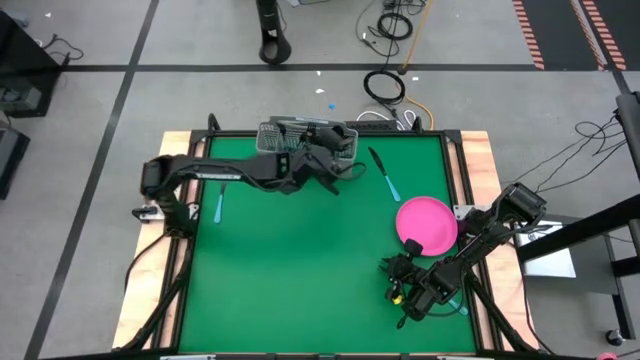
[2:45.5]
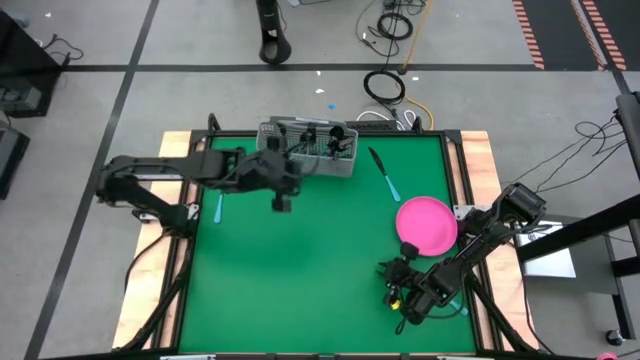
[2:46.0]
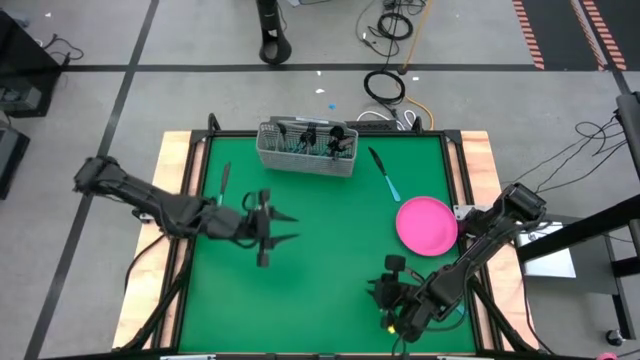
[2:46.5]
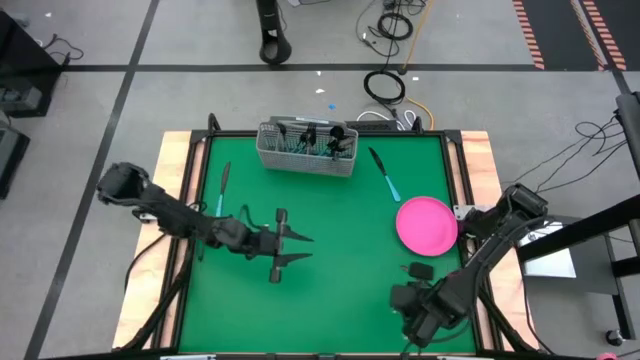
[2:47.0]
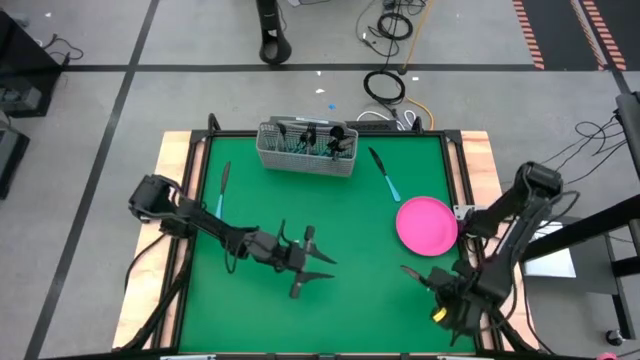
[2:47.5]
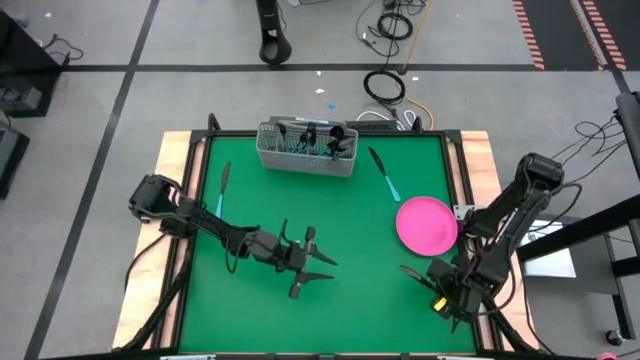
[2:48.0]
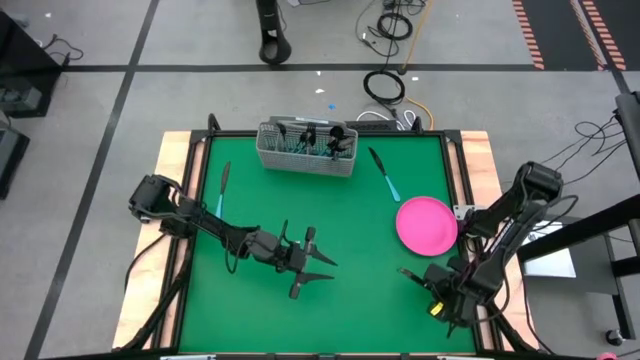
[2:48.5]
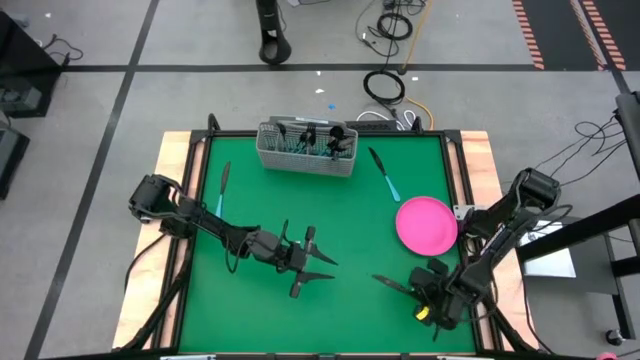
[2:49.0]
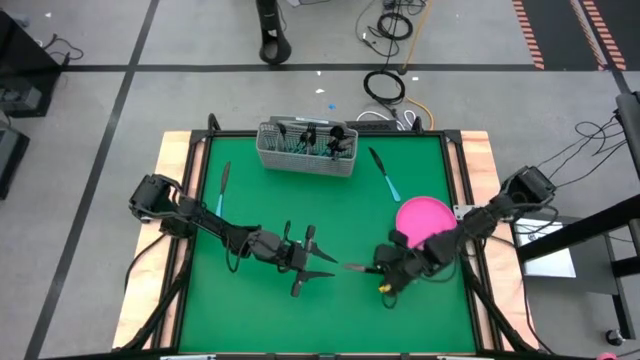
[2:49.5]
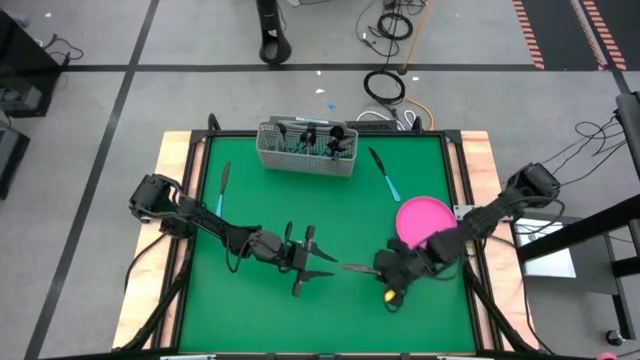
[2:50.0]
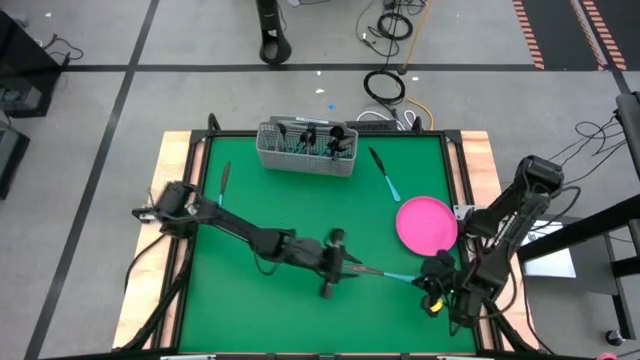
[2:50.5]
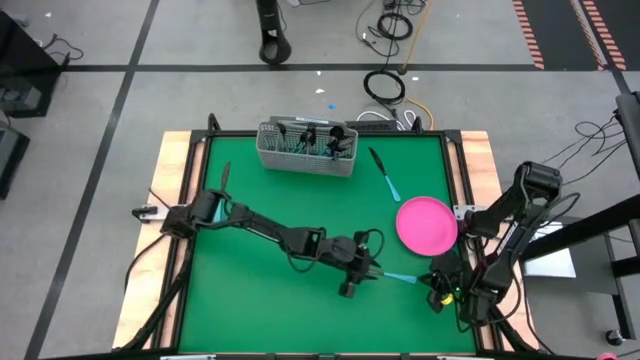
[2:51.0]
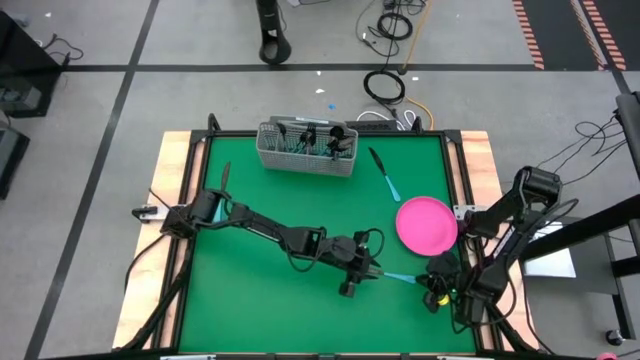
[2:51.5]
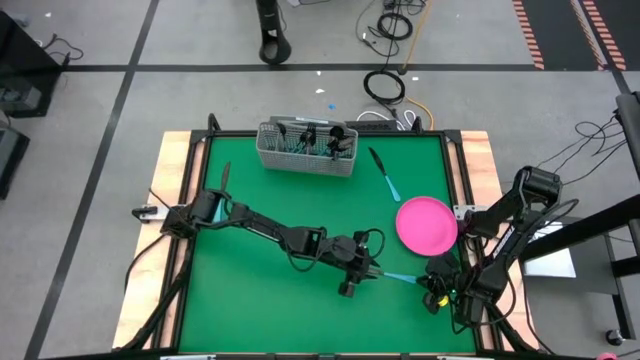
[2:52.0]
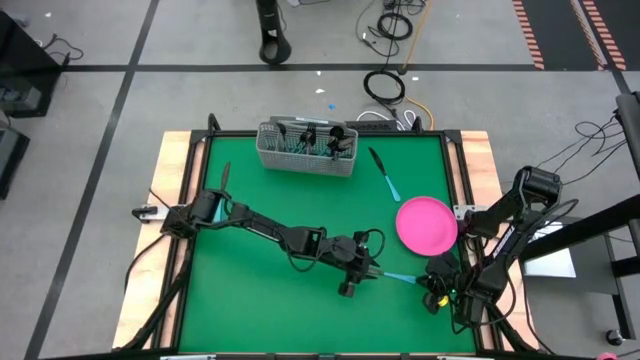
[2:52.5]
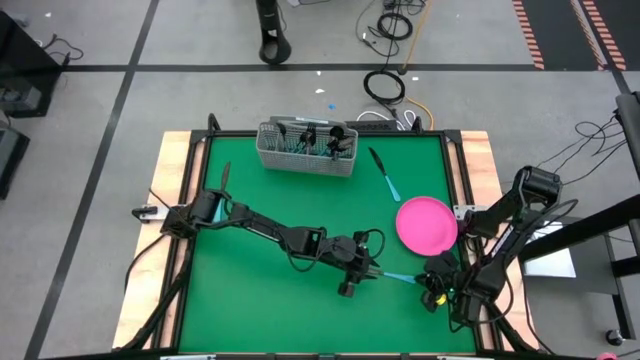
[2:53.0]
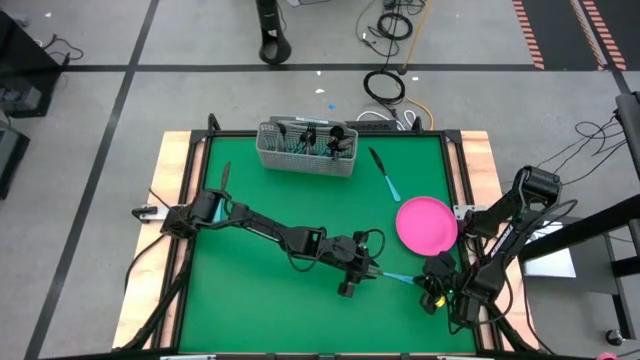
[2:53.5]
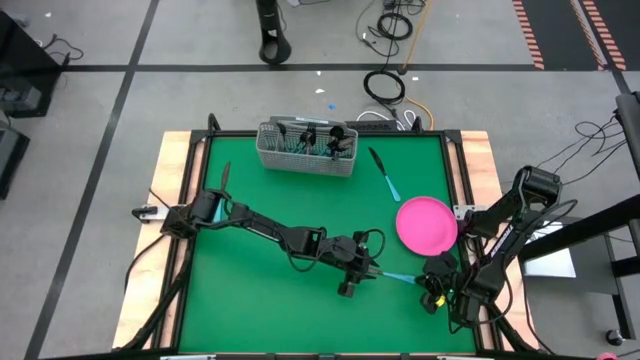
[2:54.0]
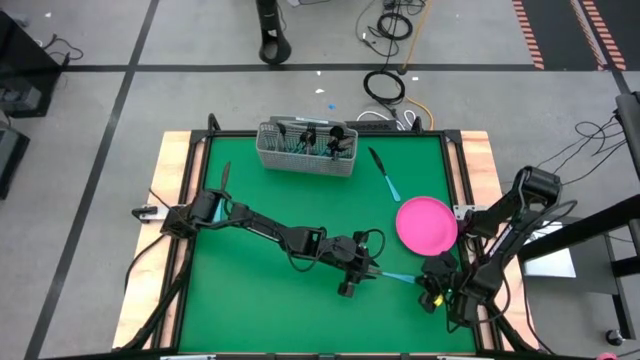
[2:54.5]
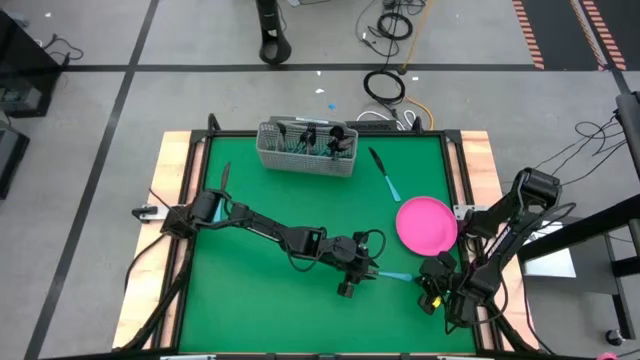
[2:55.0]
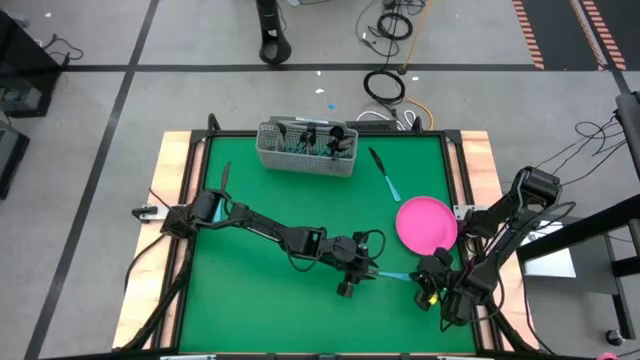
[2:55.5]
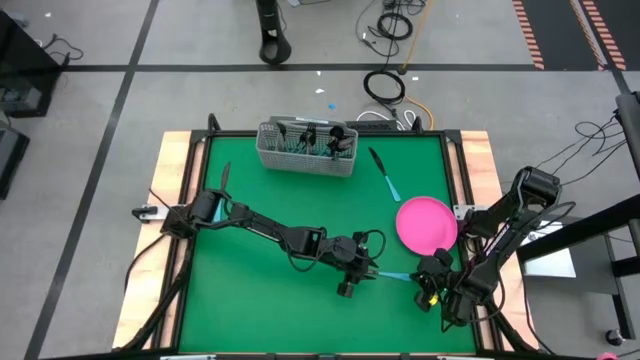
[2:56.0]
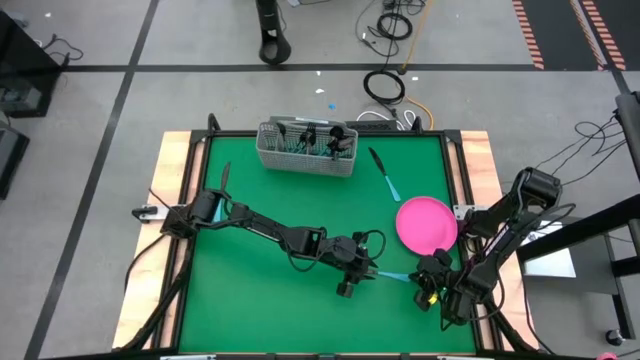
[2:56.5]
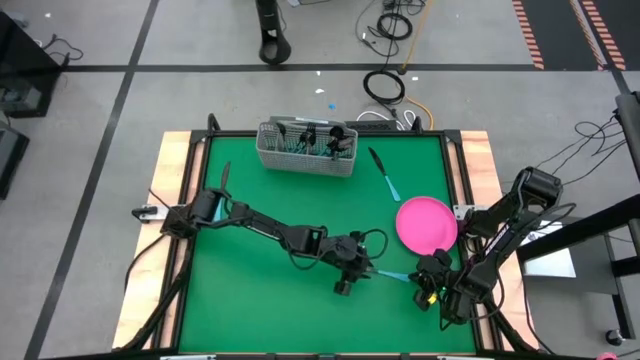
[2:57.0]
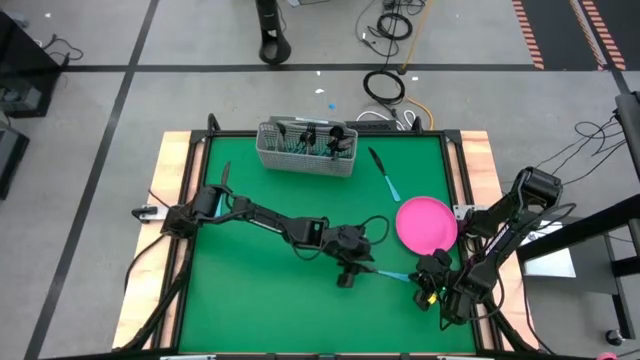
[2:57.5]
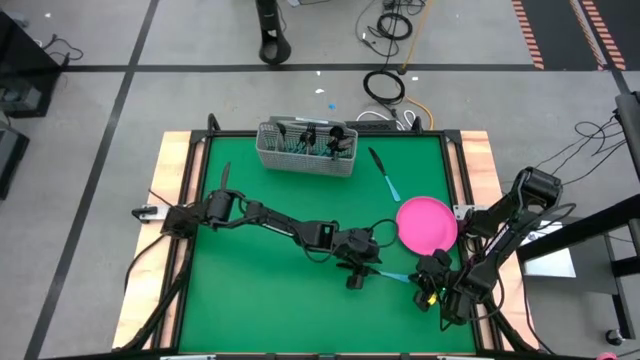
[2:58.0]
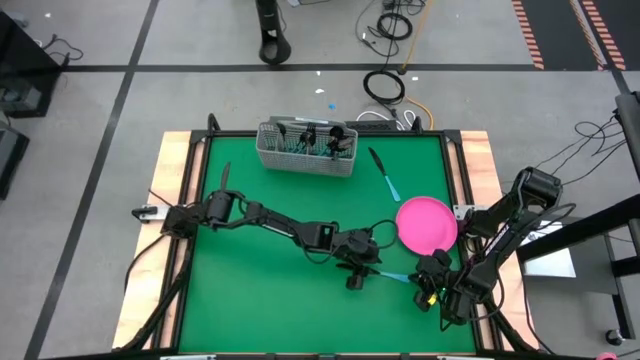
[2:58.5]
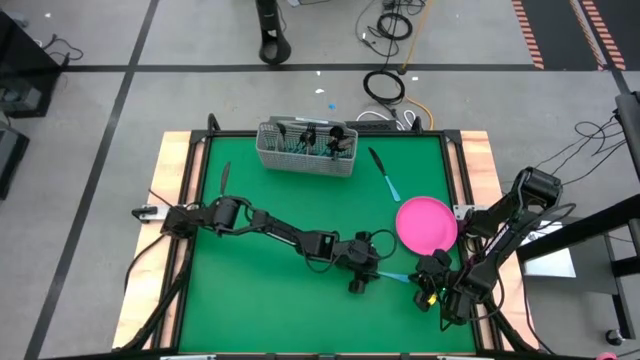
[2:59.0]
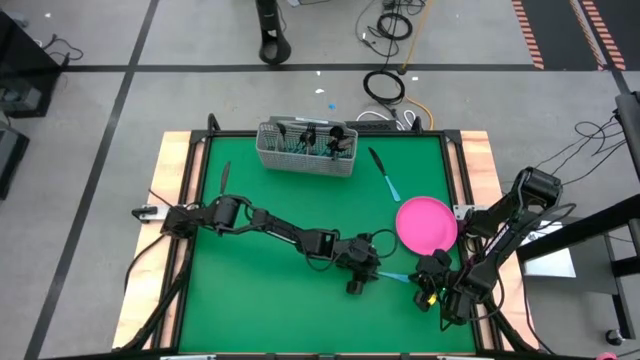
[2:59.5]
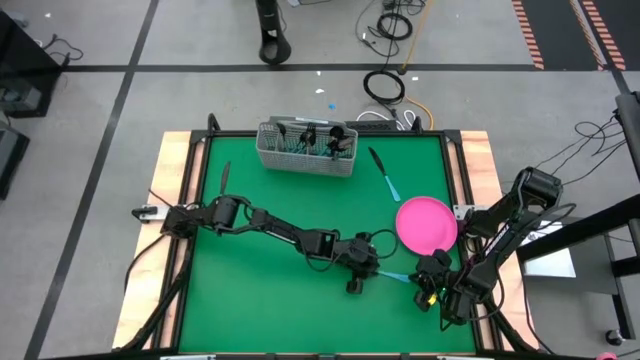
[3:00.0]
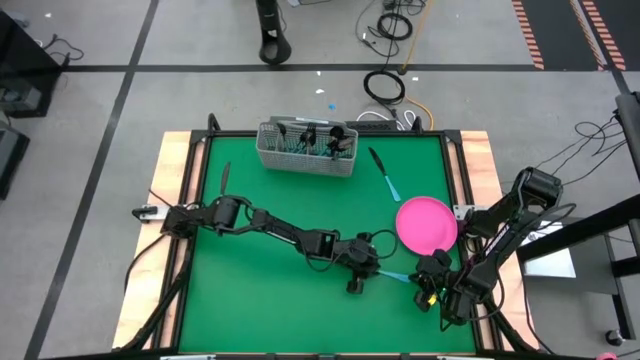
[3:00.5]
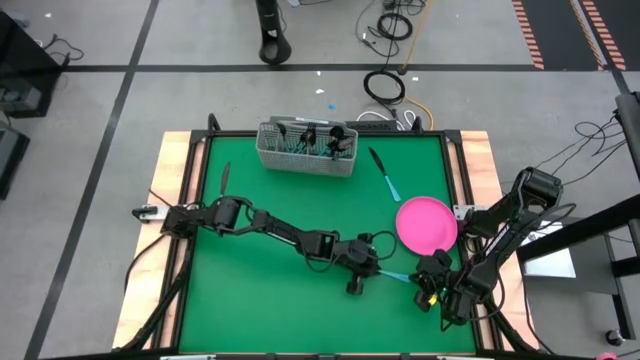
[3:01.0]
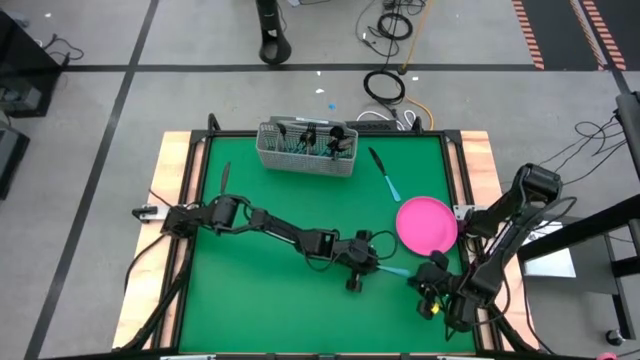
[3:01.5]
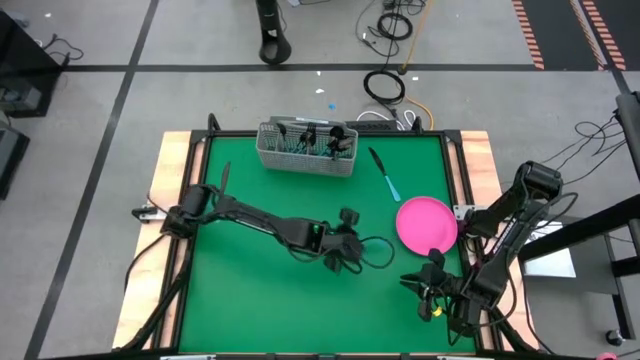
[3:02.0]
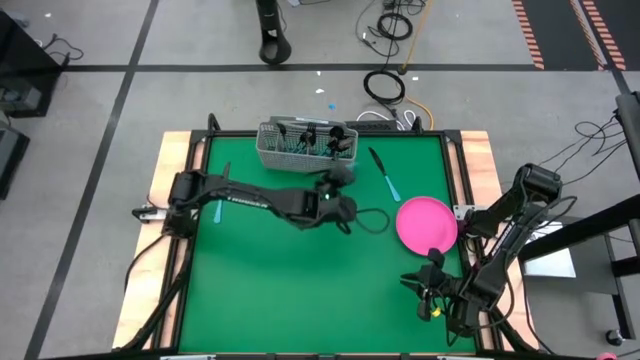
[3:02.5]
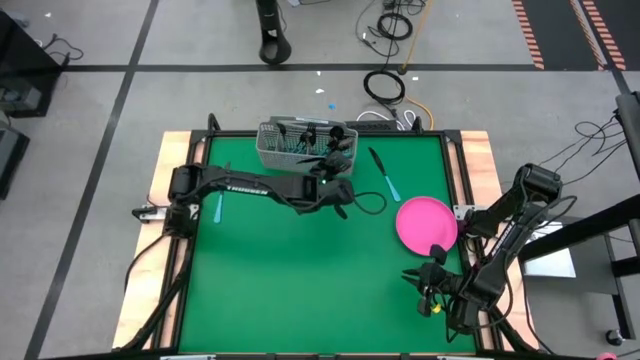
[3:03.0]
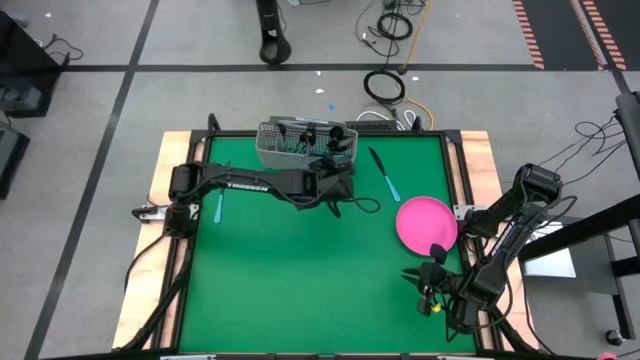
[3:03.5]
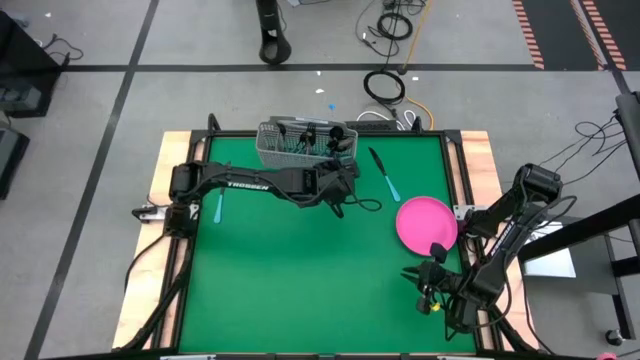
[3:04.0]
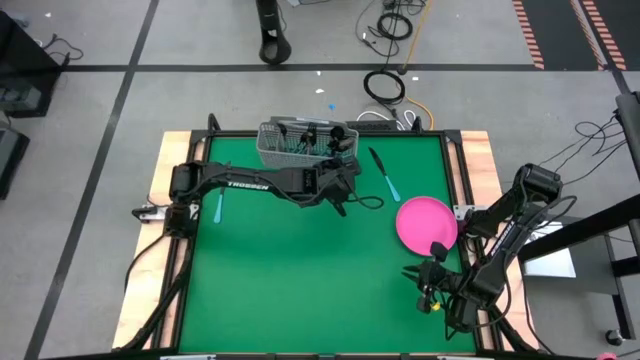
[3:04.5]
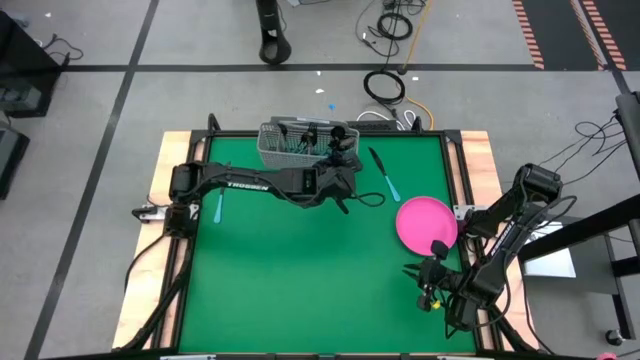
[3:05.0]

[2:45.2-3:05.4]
Task: Sort silverware
Put the blue table knife into the silverware tray with the other blue table knife

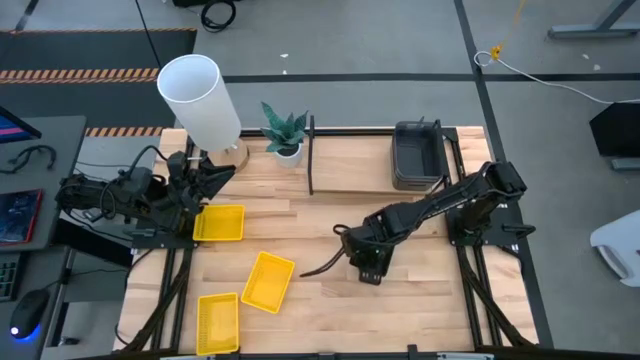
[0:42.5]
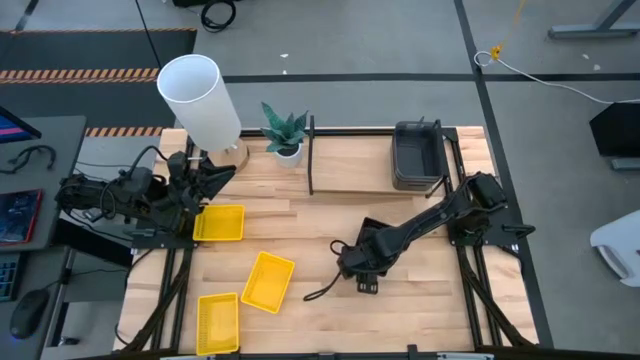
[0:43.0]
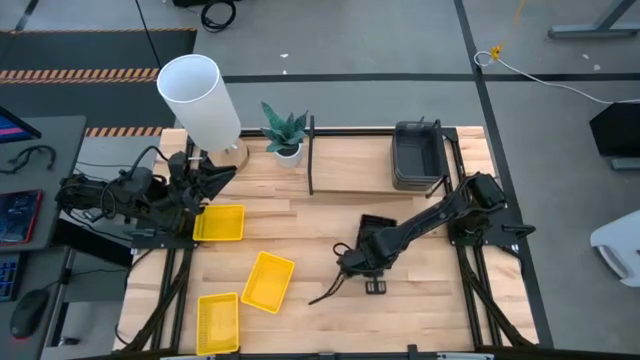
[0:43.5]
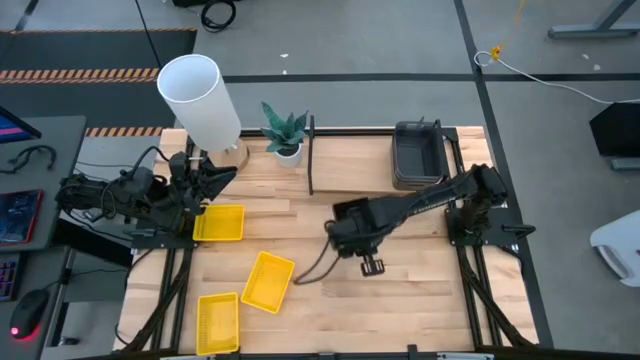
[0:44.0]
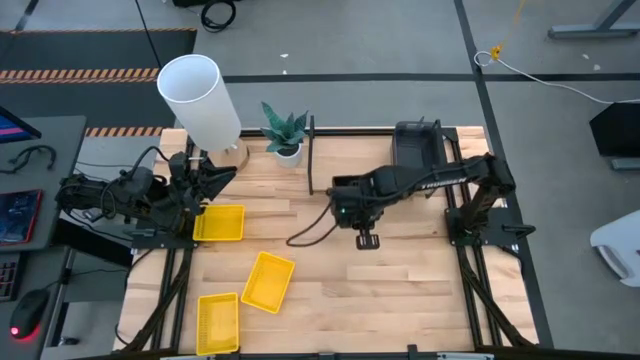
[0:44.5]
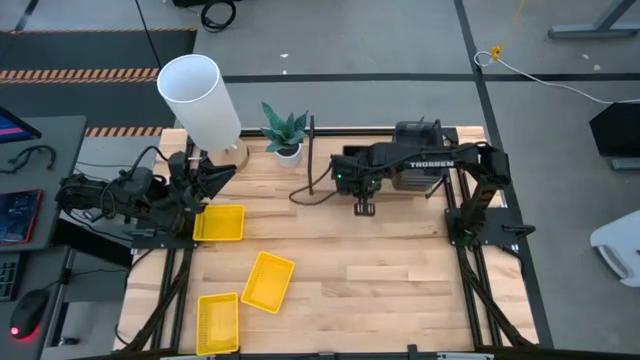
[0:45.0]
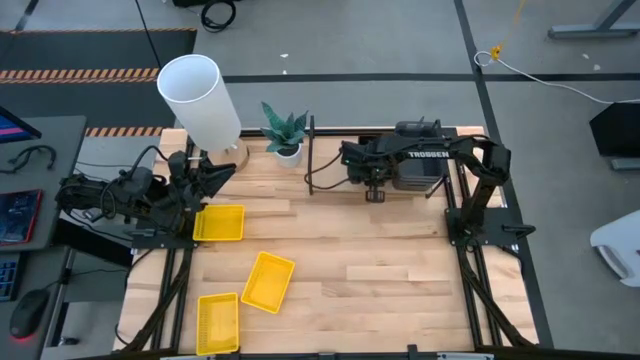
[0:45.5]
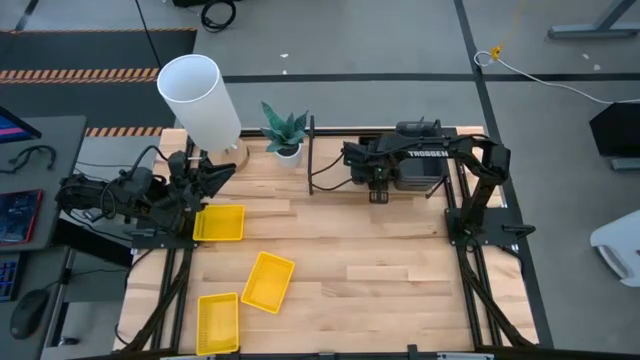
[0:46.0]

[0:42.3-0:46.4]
Task: Stack baskets on shelf by color
Put the stacked black bins on the shelf
